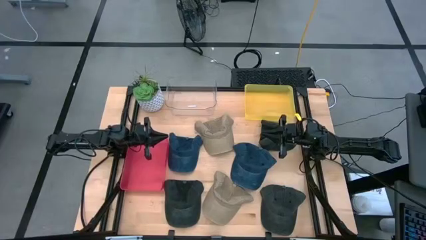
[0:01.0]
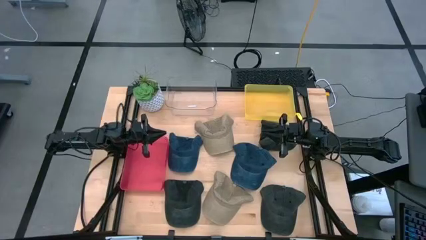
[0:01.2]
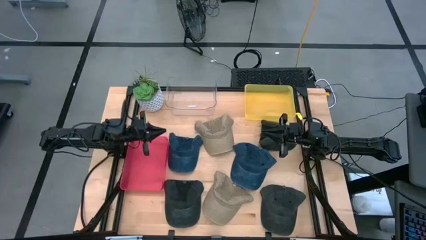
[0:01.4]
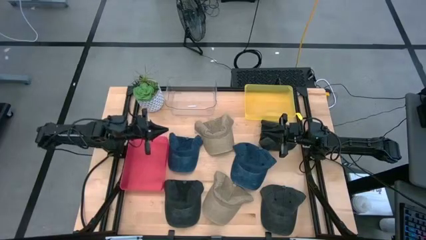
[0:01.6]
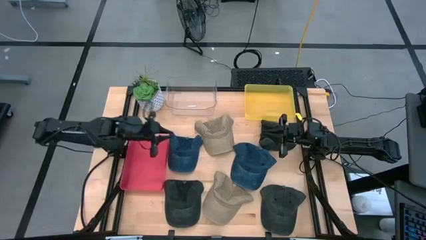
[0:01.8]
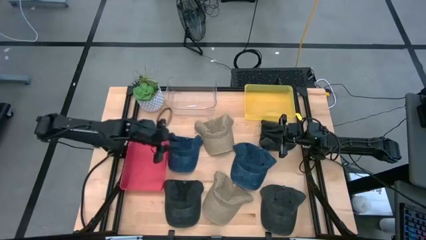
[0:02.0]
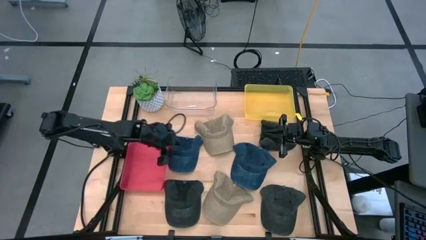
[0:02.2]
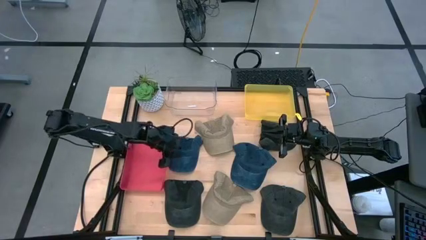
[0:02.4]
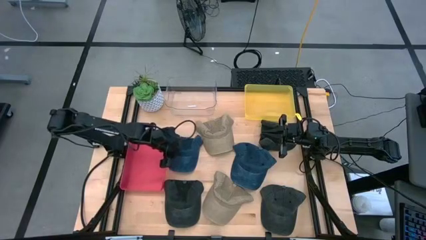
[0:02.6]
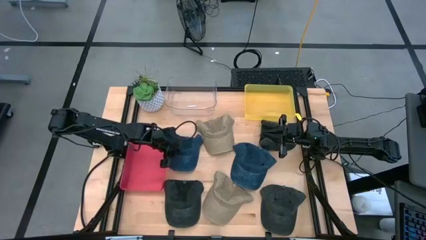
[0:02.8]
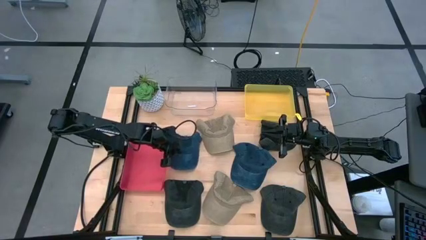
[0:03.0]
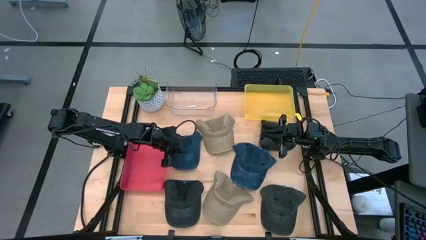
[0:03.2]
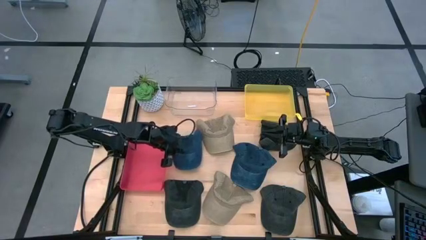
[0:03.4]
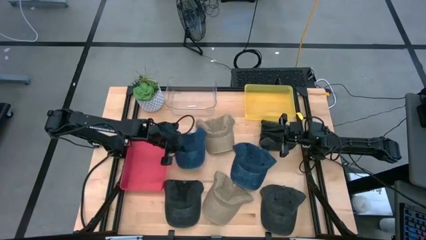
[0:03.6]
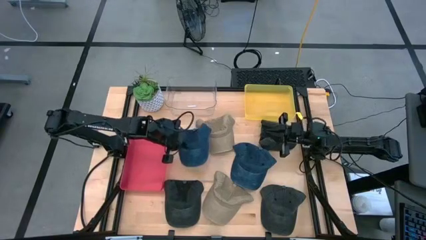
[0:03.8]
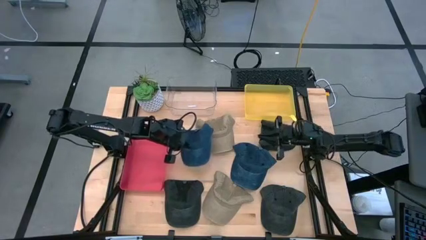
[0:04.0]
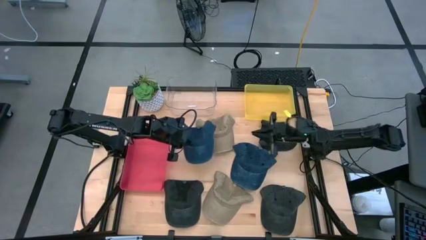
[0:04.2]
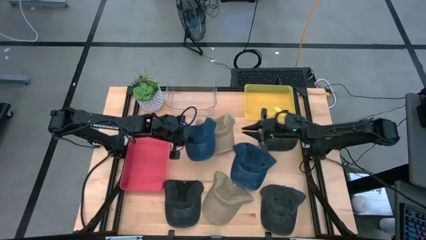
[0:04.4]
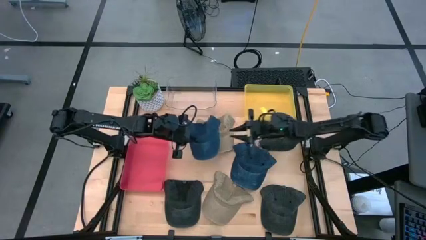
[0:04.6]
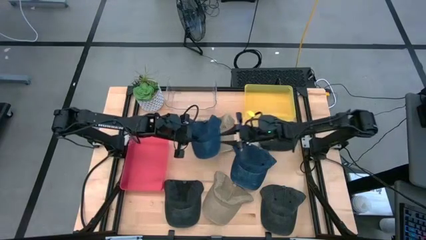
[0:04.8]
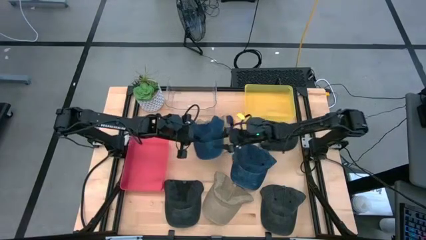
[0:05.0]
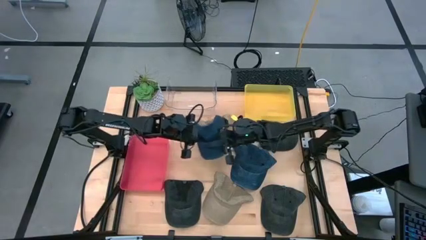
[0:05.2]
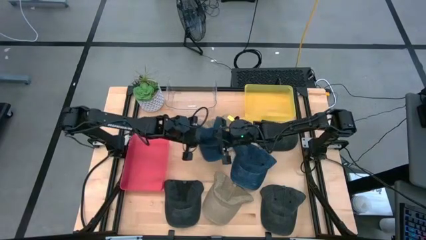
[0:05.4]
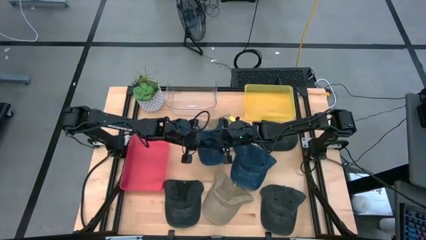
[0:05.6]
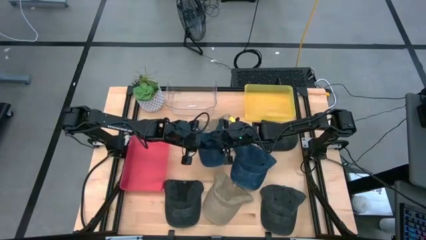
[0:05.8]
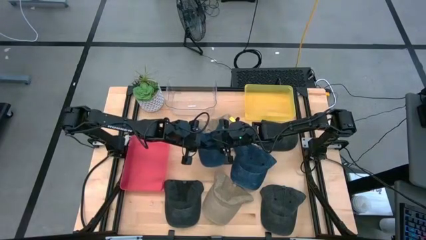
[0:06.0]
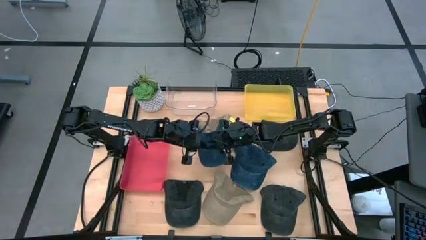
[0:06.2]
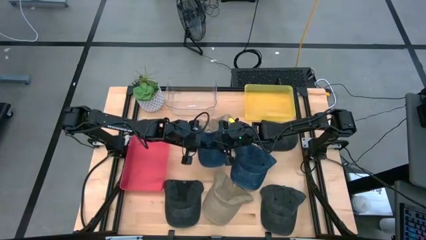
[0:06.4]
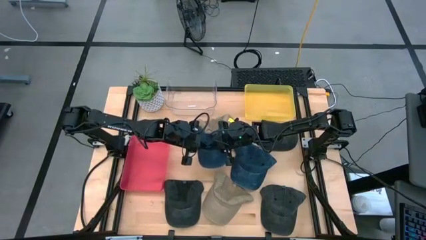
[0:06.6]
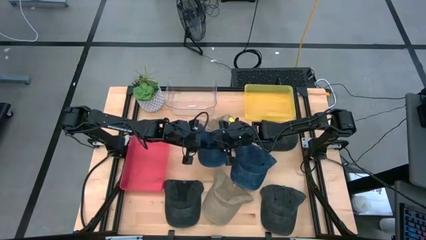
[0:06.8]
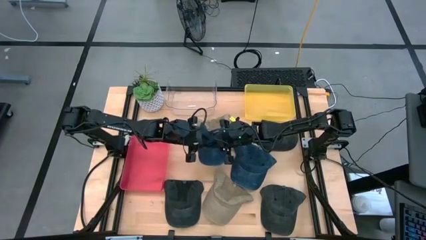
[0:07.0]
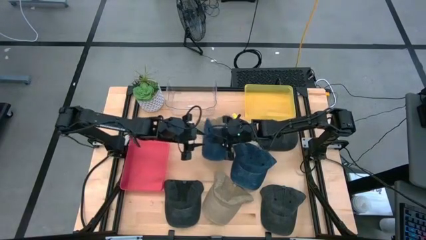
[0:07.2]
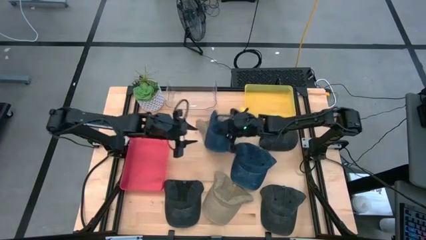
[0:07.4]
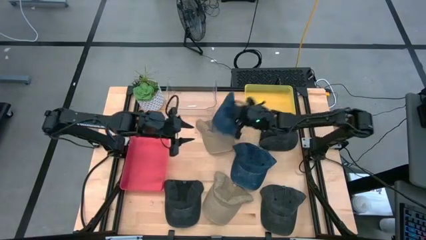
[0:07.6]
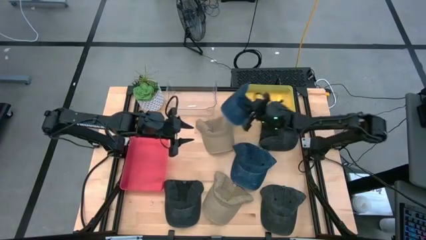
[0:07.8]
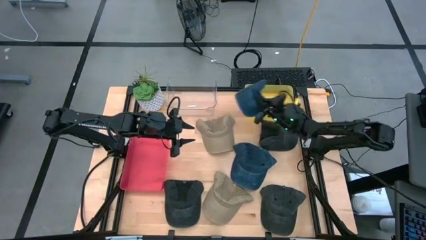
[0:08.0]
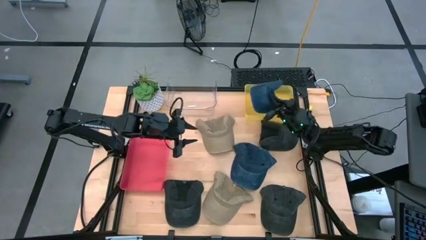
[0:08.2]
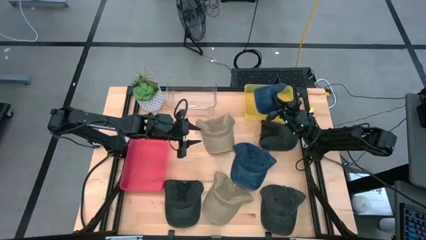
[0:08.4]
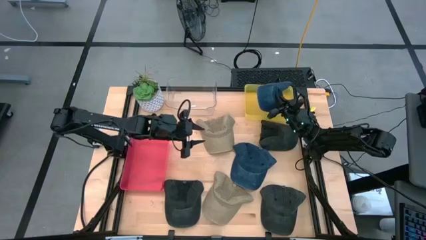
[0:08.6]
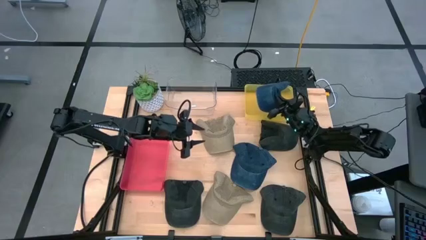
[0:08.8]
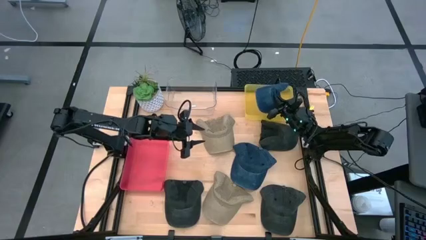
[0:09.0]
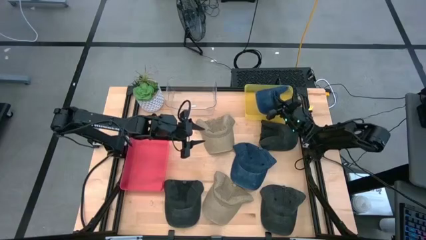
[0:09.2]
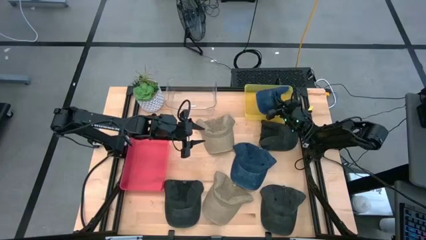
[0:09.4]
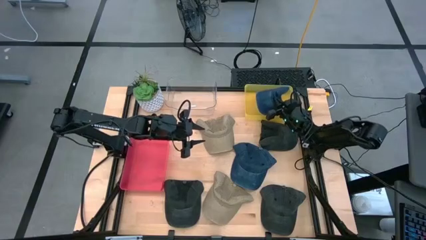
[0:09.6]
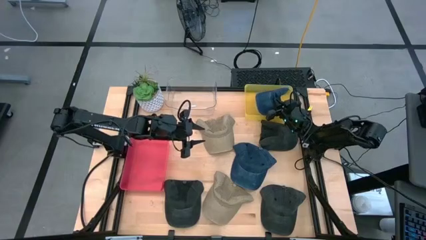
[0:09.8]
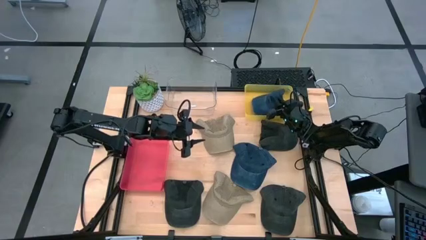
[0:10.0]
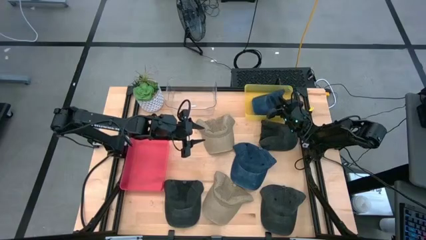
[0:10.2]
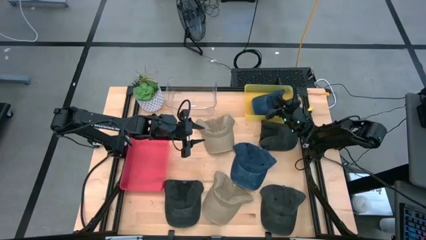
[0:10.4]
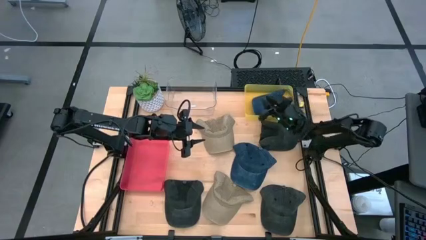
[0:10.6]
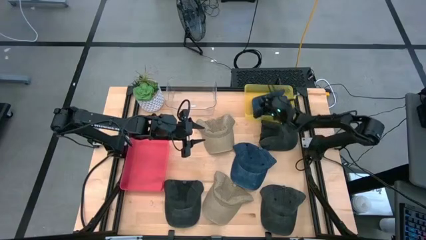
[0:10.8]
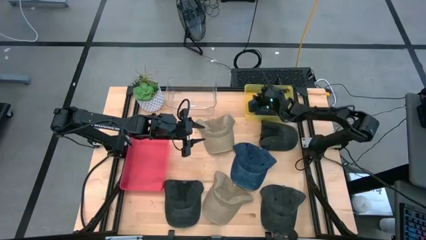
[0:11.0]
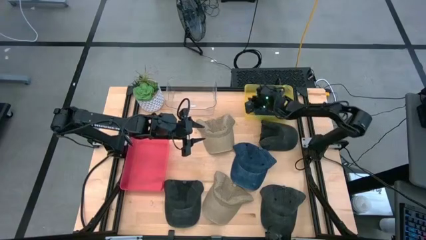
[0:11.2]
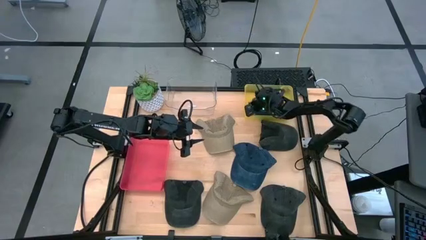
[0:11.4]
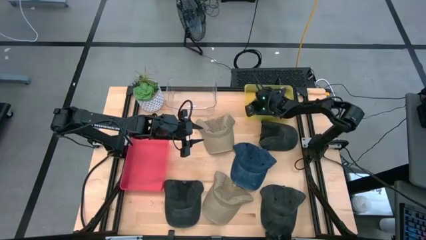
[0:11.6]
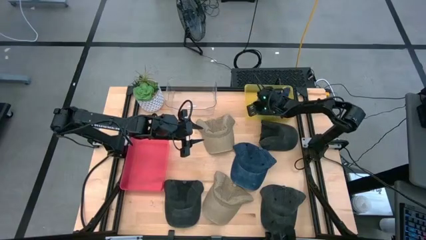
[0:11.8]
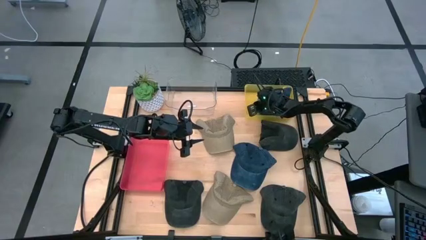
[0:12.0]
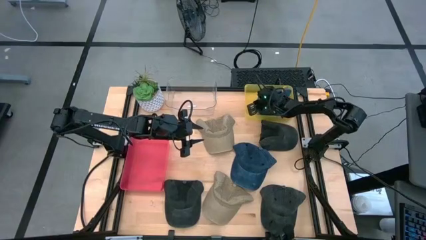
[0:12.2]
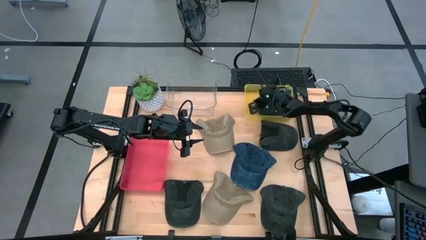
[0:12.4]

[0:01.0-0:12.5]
Task: Pick & Place hat
Put the left blue cap into the yellow bin
